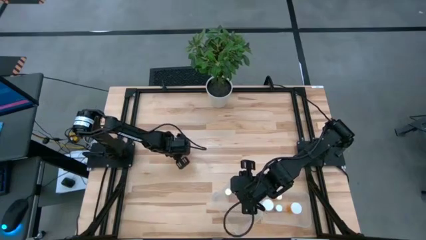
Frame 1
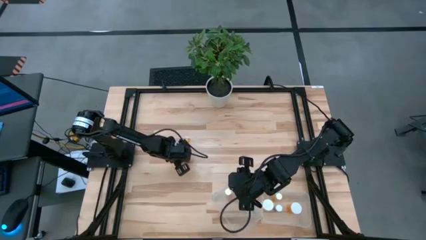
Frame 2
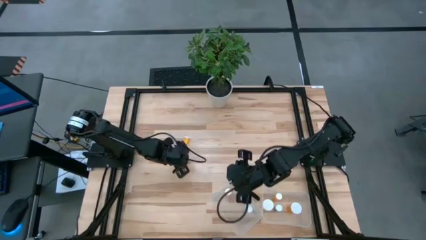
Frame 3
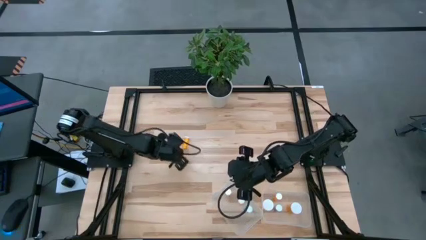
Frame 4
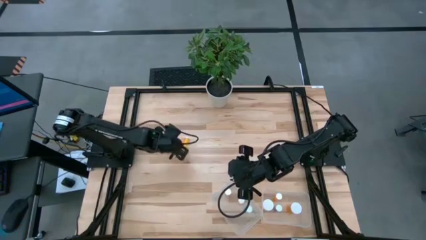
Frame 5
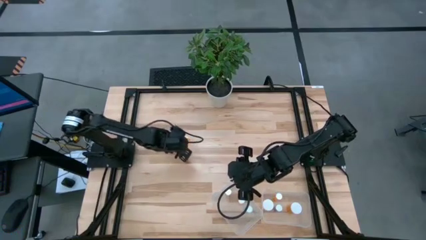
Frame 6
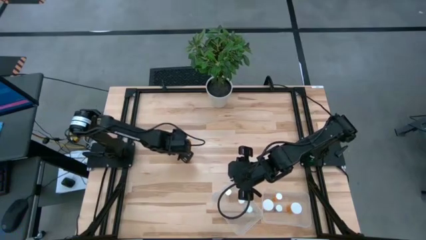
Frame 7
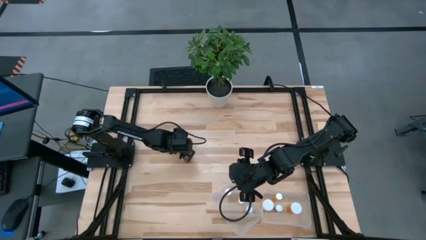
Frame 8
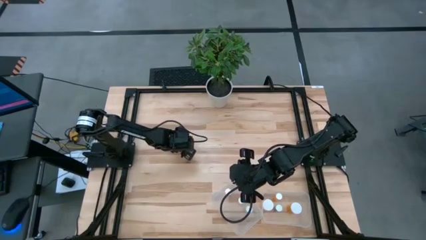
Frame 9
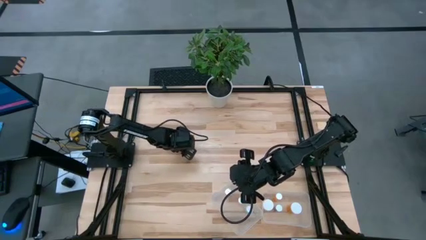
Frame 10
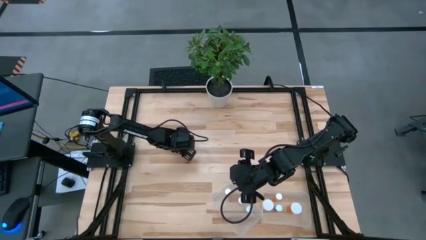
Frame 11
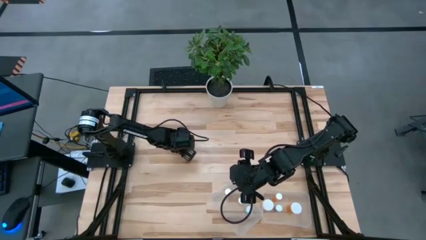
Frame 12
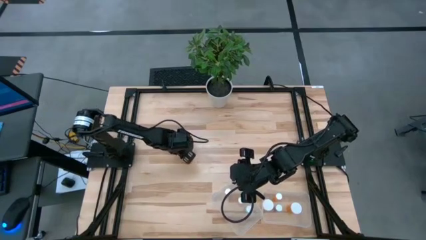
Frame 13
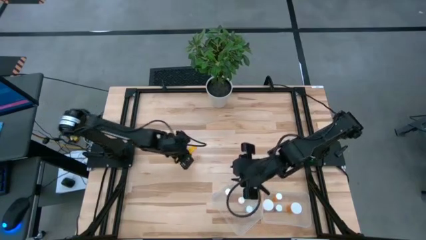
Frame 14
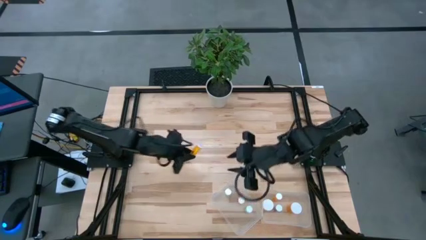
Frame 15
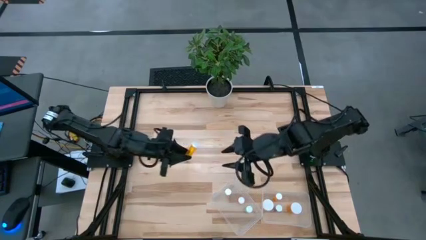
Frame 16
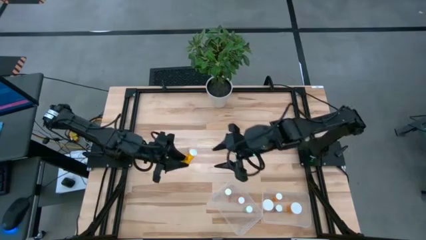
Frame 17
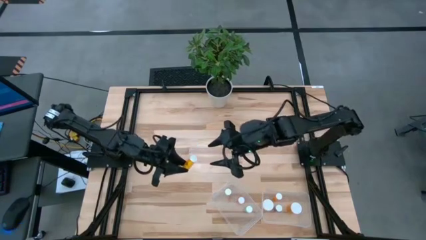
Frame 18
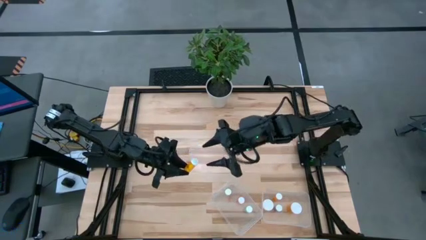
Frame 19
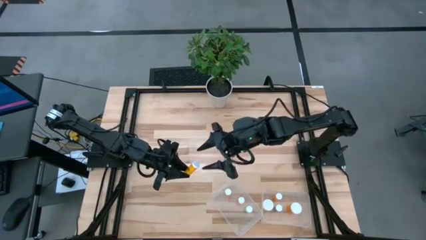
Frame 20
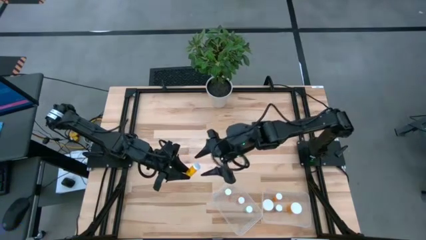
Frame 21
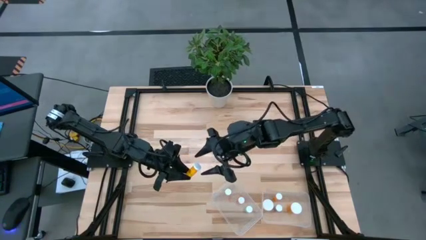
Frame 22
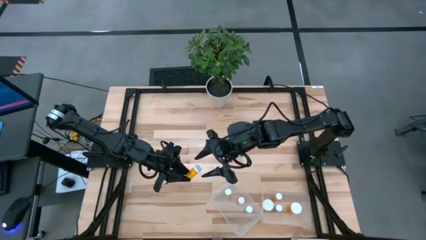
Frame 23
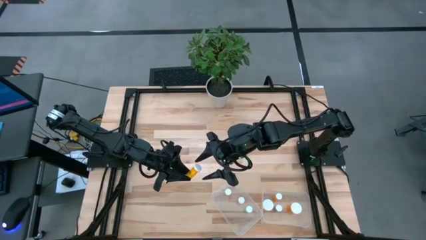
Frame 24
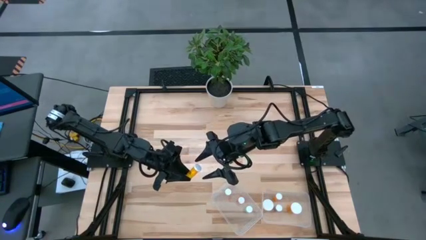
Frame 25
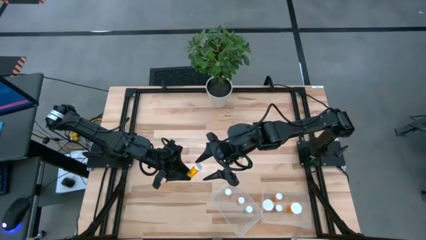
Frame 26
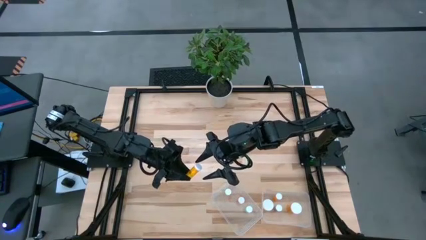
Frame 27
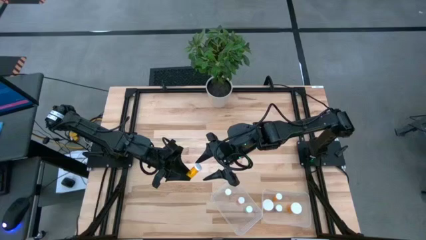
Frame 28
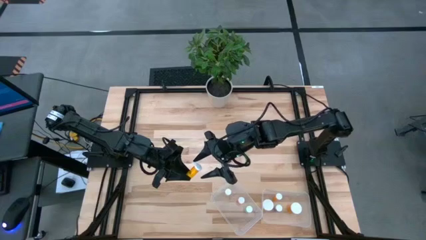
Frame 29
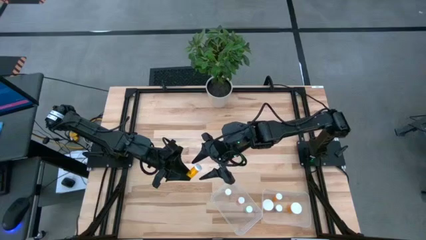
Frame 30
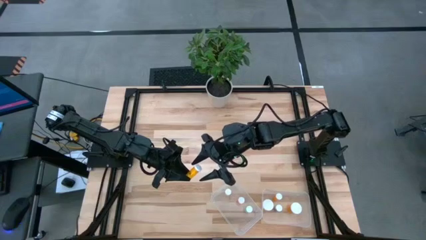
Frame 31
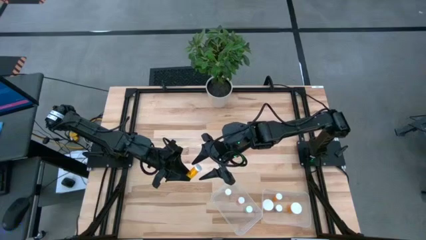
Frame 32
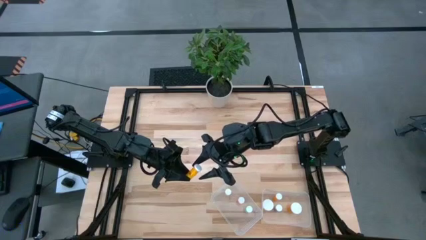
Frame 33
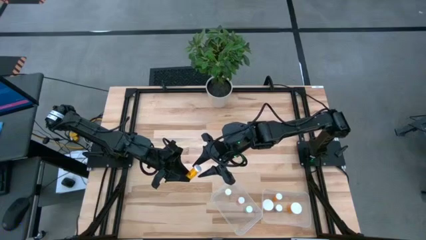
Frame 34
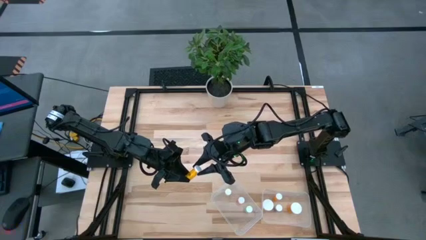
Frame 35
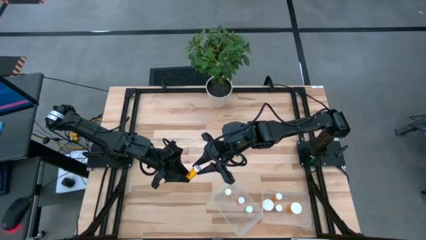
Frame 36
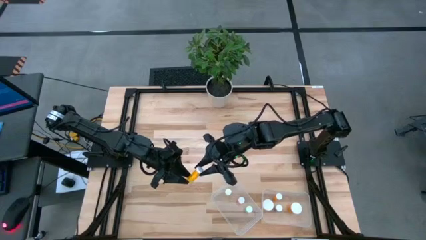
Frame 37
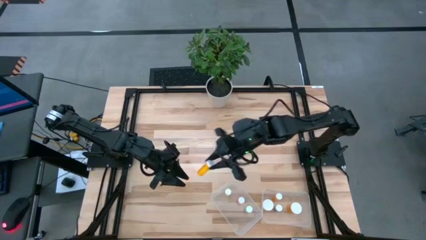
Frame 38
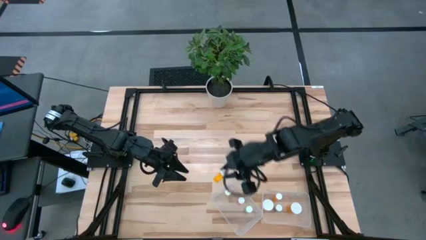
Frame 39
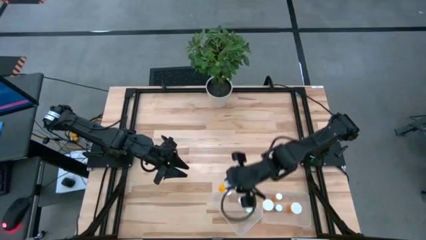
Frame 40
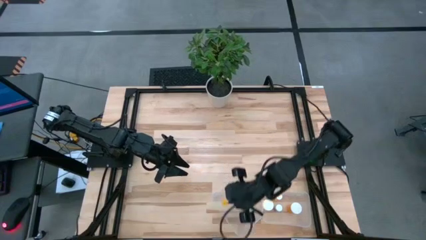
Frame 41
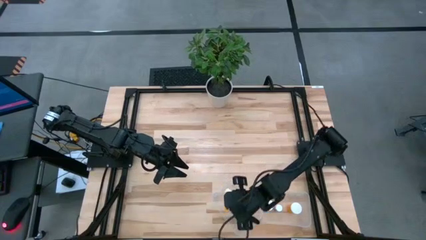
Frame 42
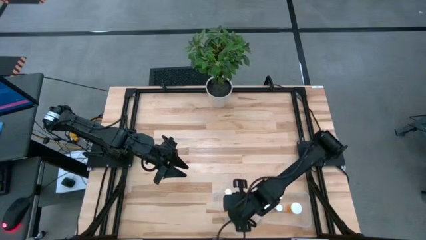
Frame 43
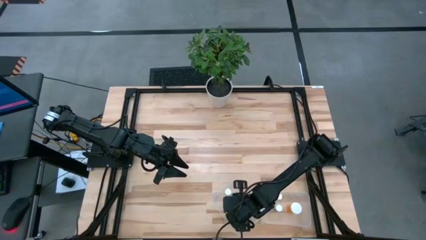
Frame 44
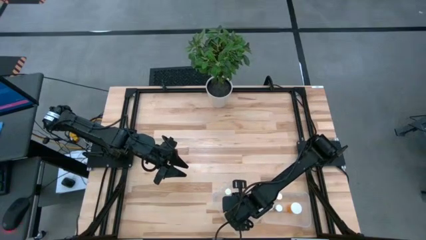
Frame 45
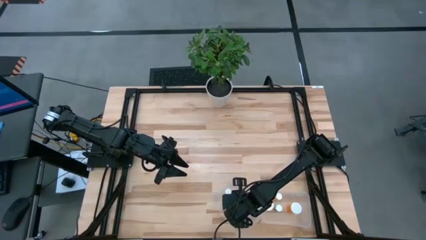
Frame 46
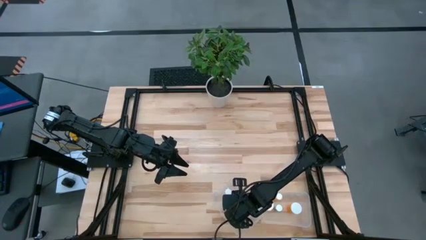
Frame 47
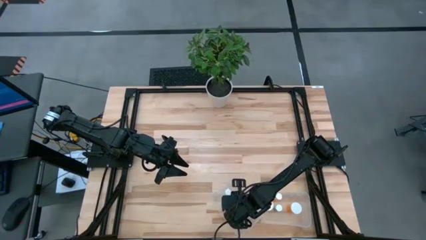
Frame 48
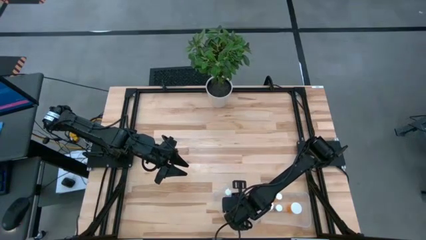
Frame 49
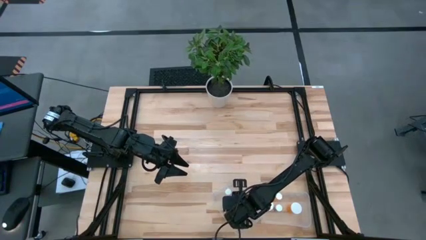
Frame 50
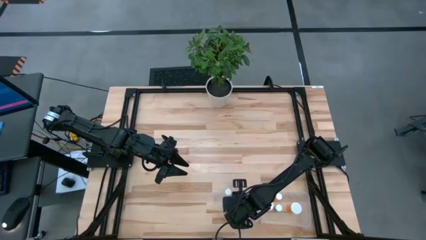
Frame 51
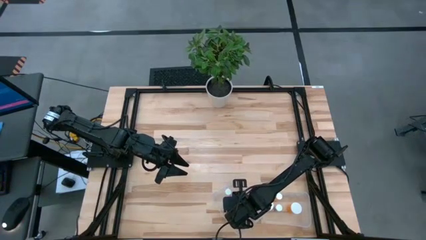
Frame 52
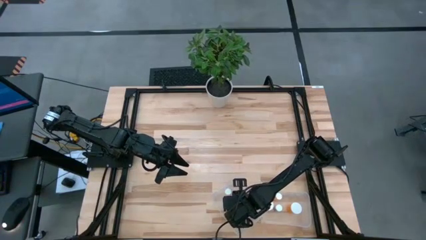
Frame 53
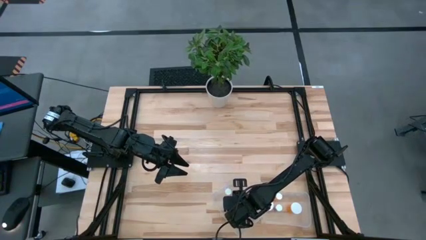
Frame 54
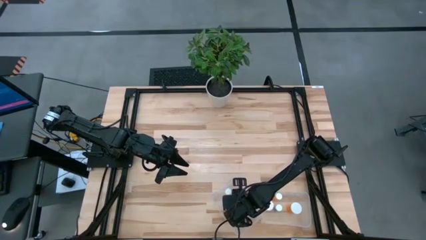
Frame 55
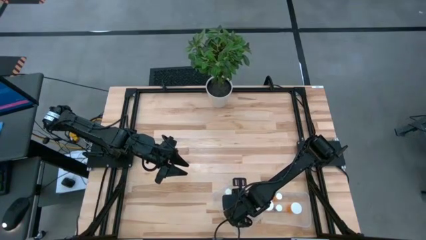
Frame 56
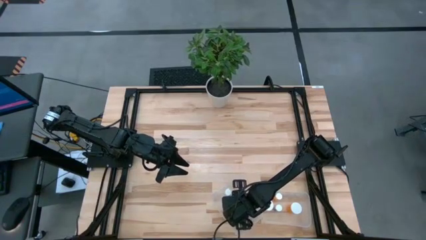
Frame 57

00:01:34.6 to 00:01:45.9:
Task: Pick and place medicine bottles into bin by pill shape (circle, oval)
Put the small orange pill bottle into the left transparent bin

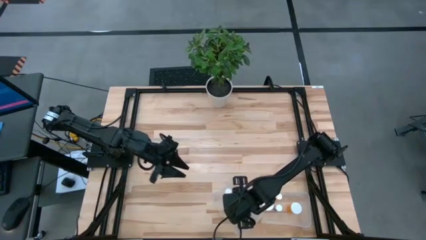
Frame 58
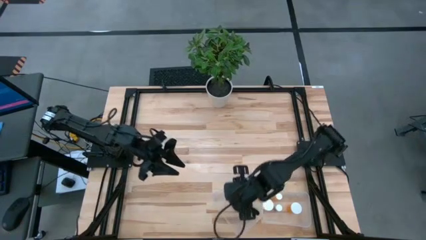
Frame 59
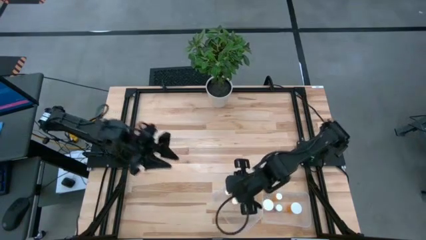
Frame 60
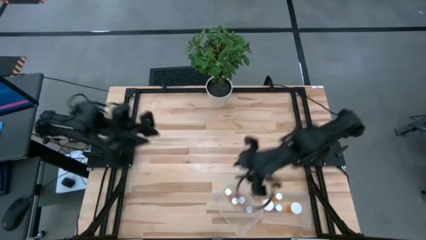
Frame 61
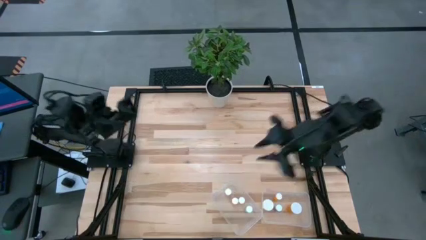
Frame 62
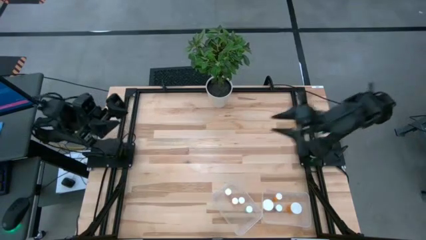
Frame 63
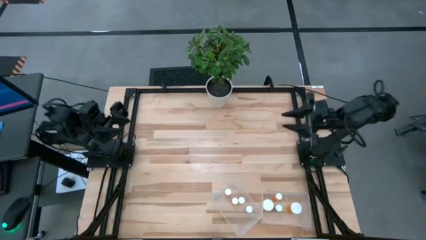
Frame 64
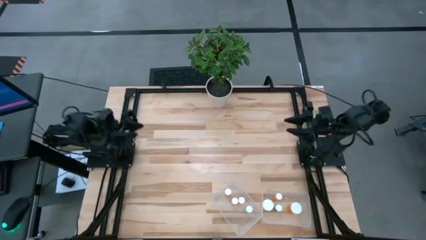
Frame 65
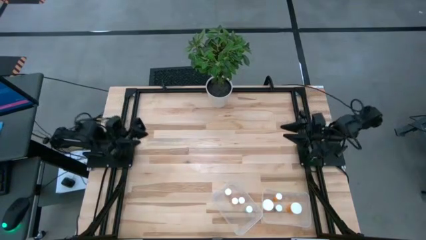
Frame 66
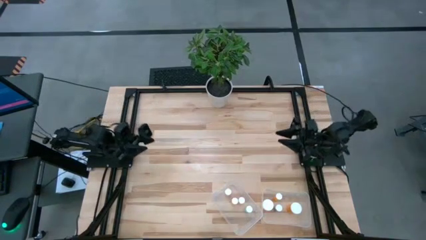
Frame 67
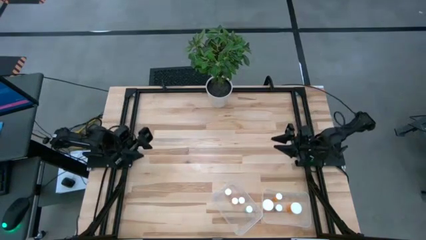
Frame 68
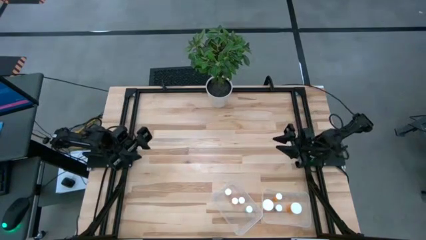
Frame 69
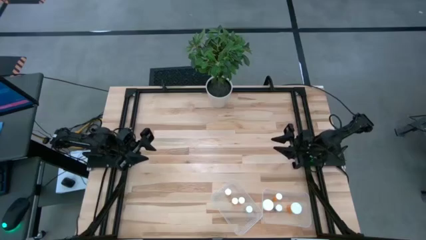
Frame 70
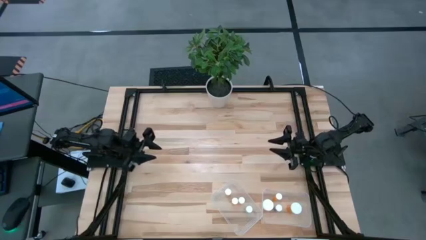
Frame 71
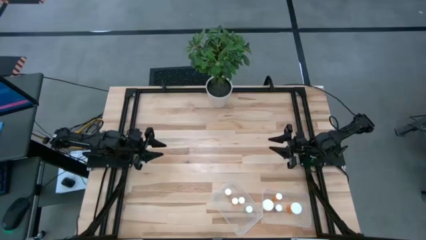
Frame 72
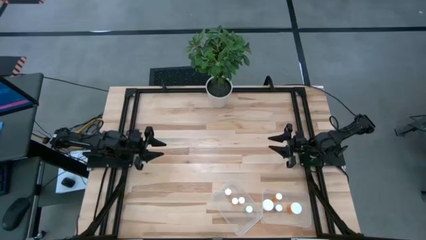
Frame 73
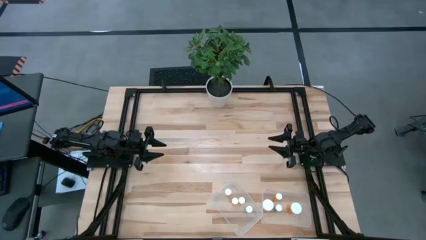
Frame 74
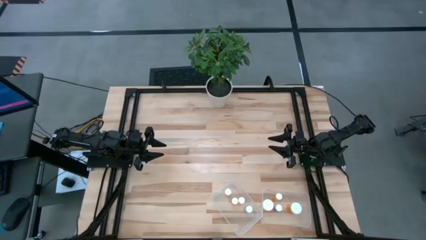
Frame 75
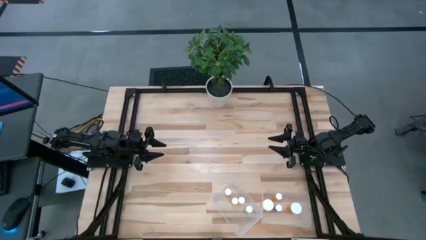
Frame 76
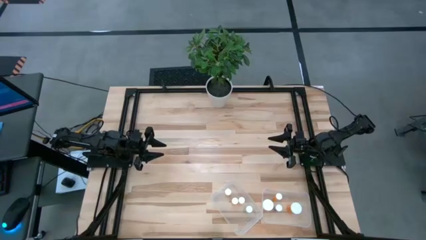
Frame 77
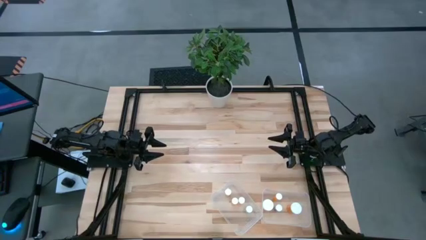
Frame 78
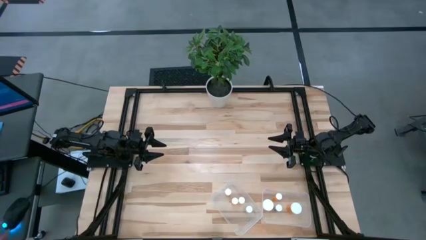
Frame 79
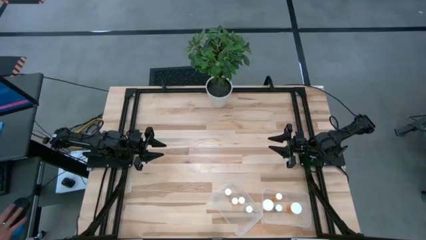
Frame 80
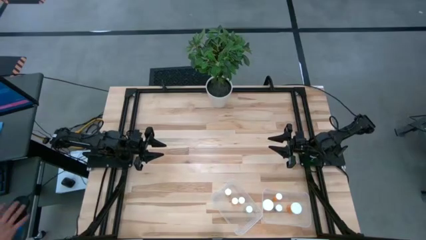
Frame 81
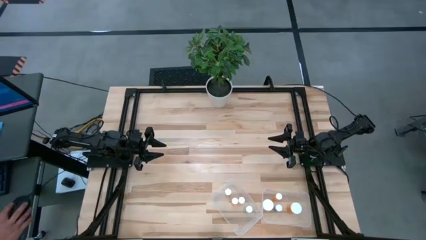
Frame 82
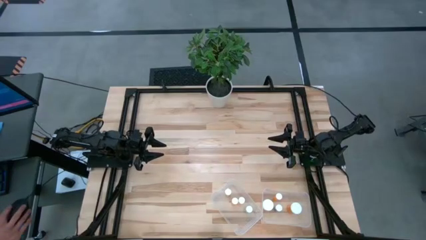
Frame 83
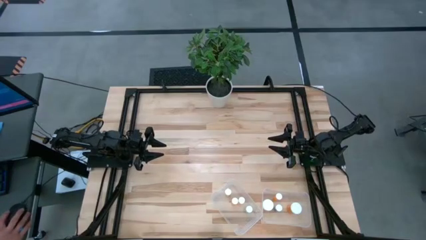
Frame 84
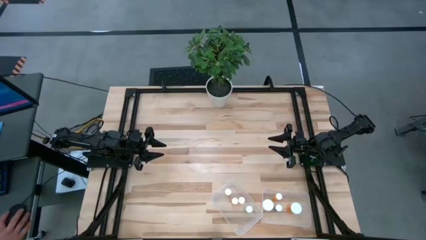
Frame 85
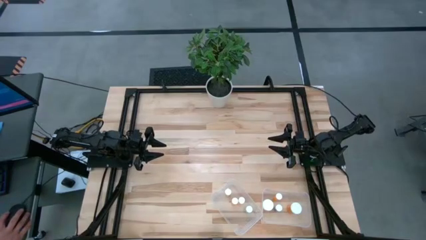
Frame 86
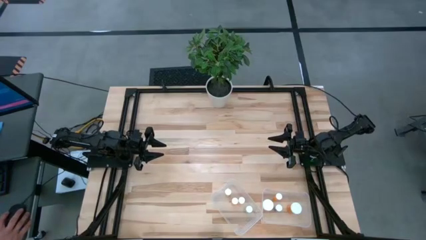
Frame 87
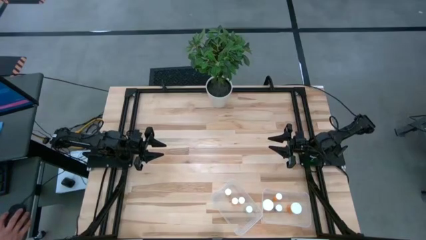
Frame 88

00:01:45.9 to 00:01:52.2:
Return to Home Position
